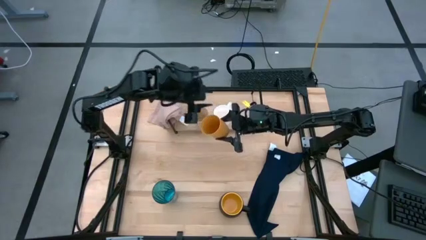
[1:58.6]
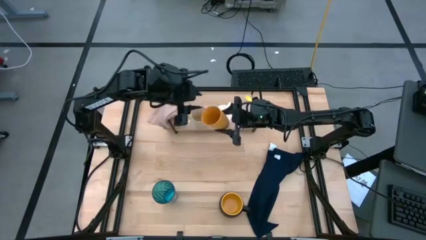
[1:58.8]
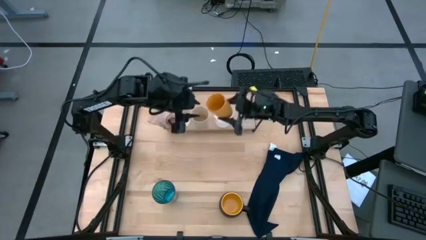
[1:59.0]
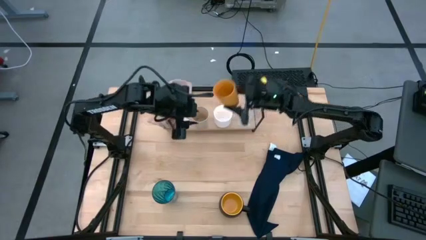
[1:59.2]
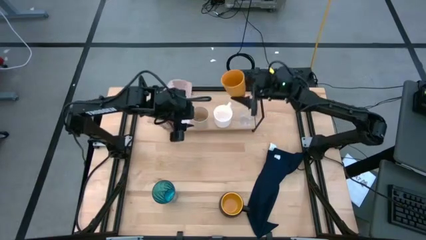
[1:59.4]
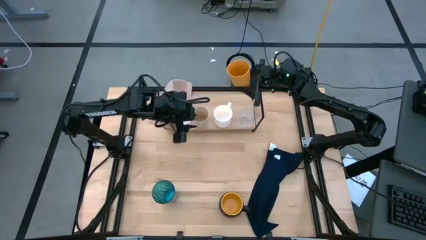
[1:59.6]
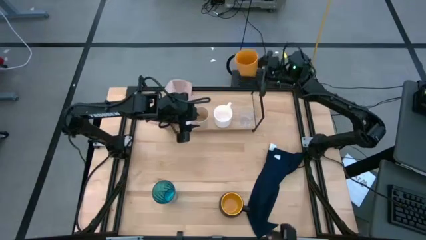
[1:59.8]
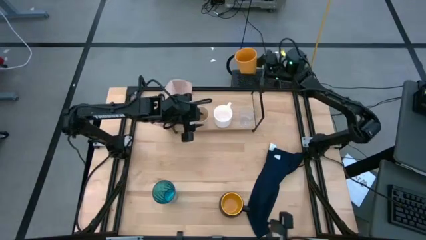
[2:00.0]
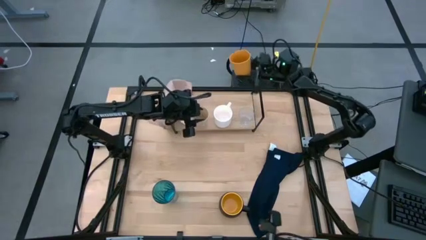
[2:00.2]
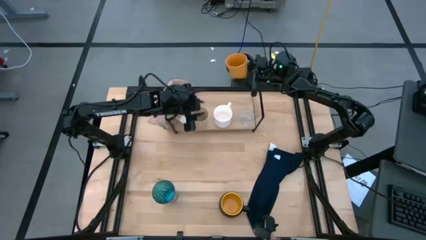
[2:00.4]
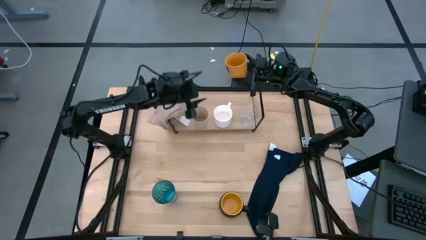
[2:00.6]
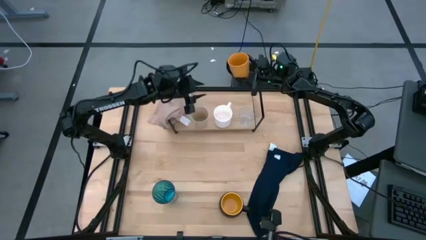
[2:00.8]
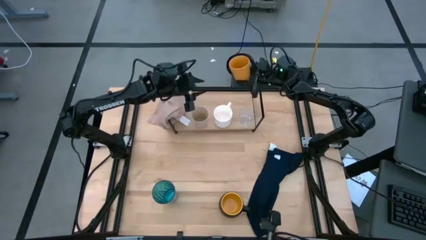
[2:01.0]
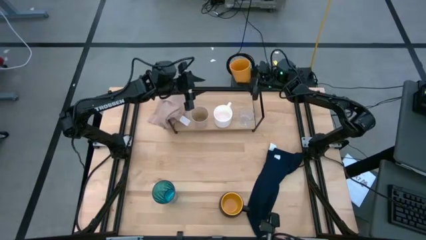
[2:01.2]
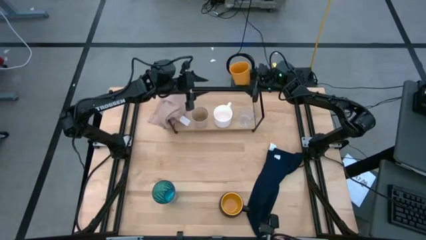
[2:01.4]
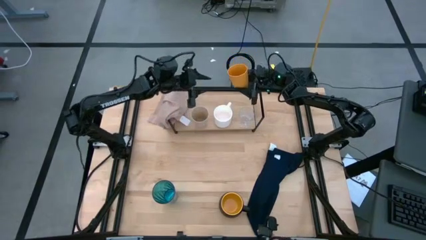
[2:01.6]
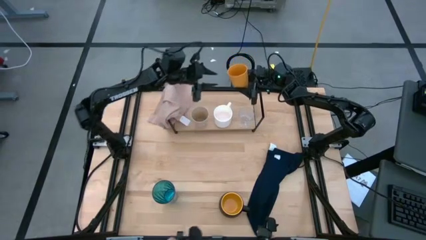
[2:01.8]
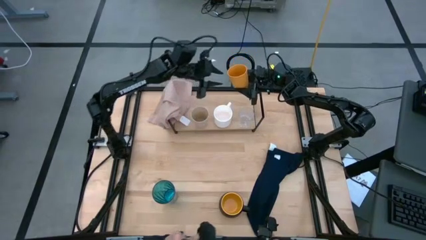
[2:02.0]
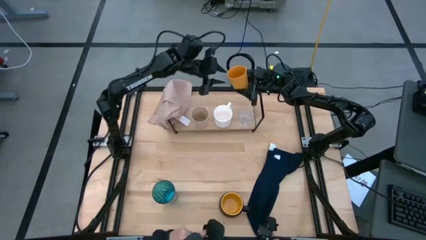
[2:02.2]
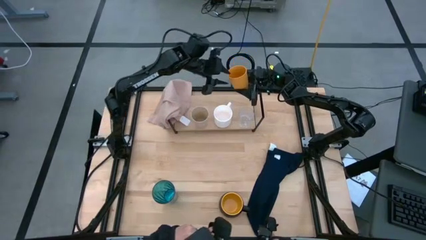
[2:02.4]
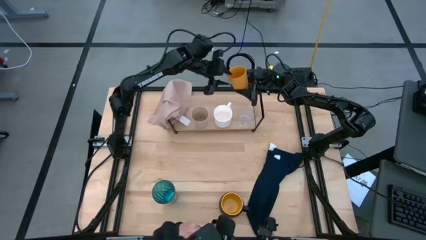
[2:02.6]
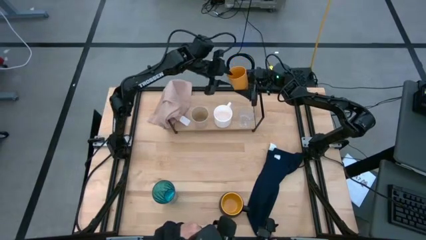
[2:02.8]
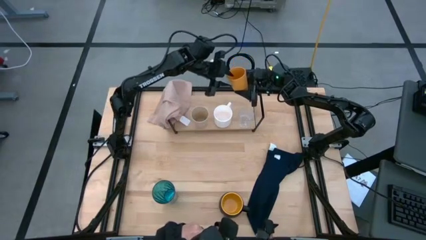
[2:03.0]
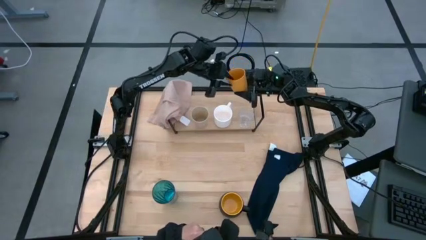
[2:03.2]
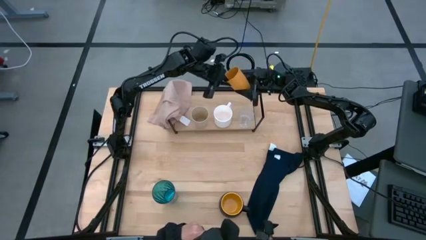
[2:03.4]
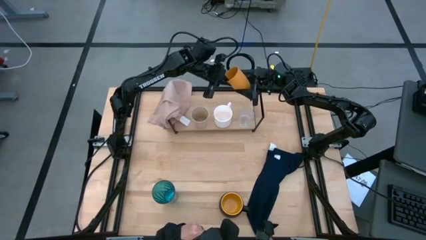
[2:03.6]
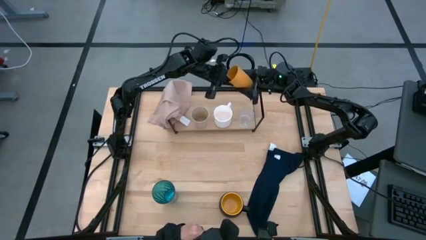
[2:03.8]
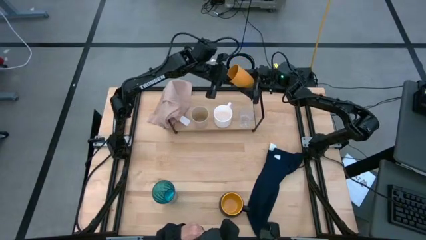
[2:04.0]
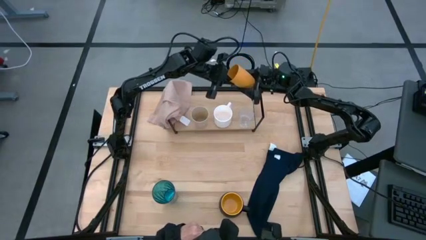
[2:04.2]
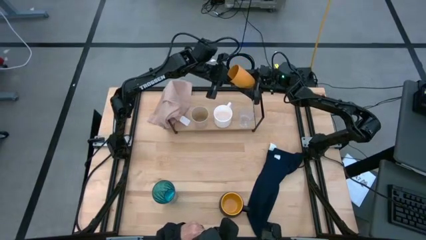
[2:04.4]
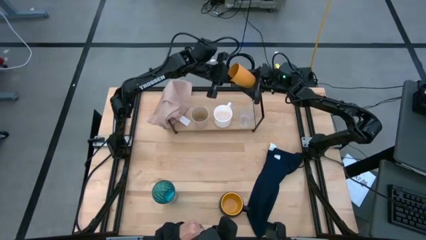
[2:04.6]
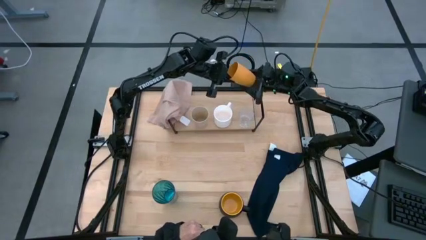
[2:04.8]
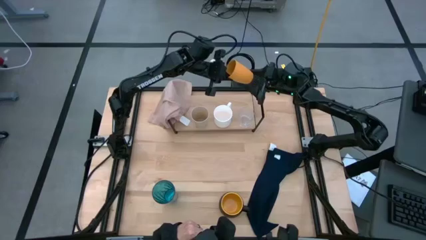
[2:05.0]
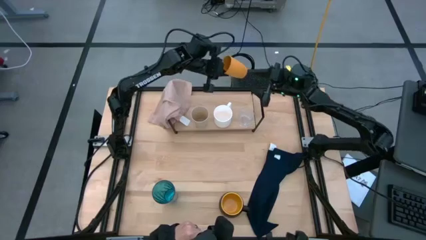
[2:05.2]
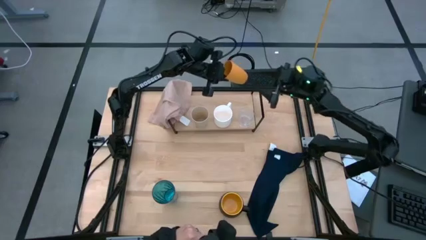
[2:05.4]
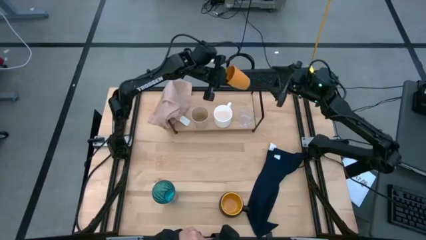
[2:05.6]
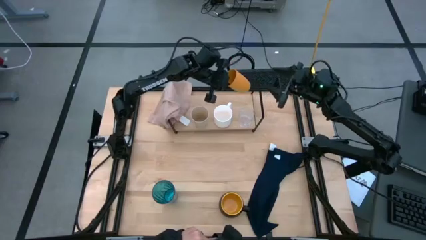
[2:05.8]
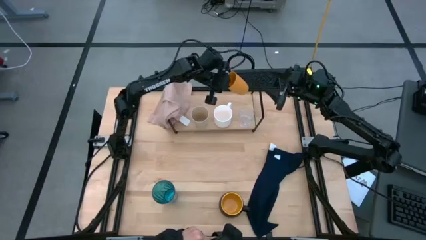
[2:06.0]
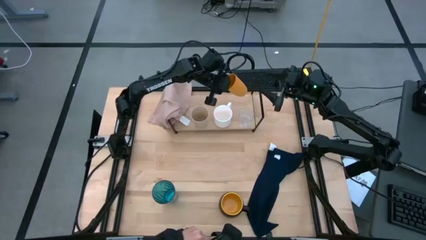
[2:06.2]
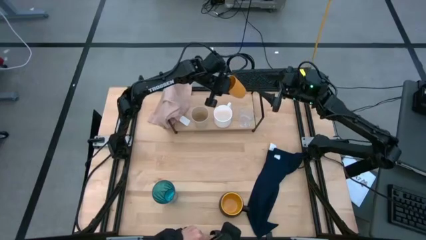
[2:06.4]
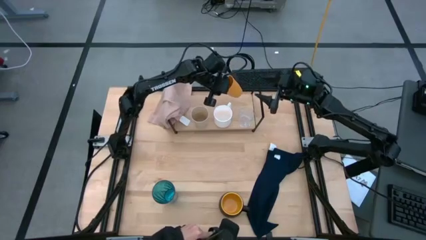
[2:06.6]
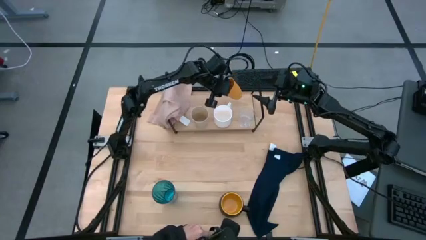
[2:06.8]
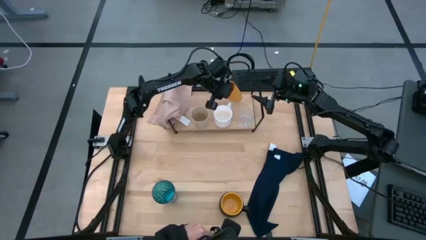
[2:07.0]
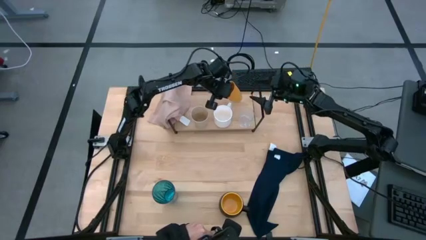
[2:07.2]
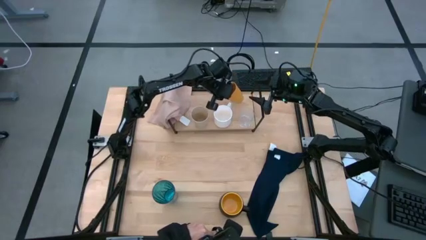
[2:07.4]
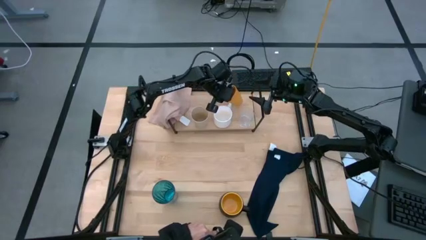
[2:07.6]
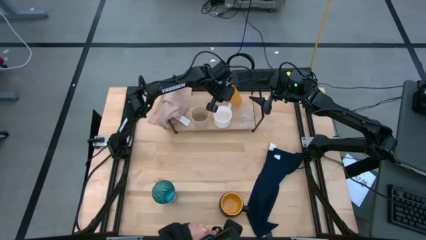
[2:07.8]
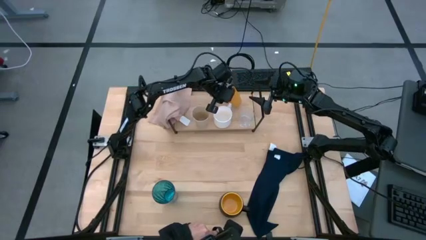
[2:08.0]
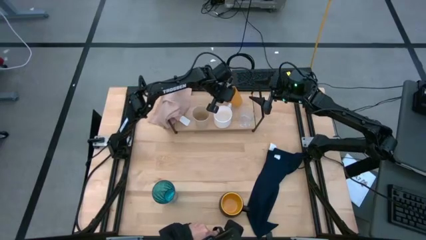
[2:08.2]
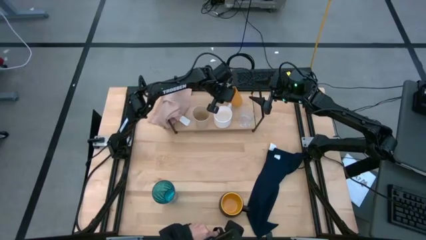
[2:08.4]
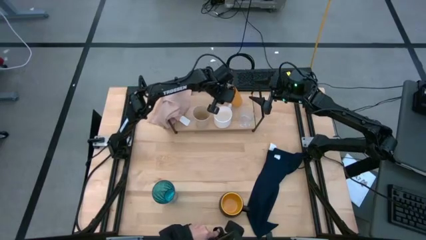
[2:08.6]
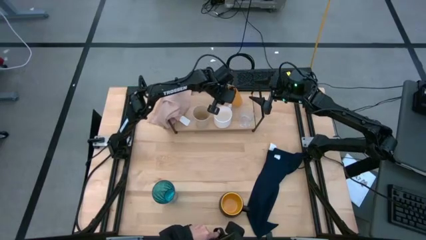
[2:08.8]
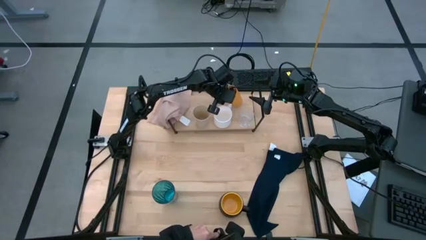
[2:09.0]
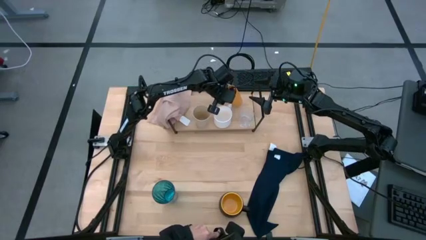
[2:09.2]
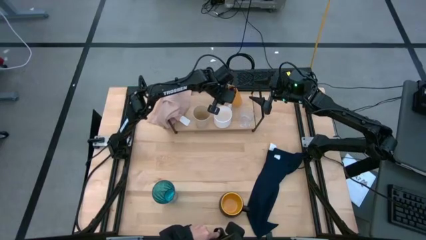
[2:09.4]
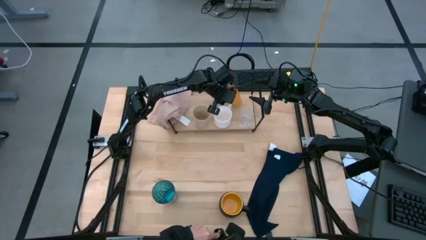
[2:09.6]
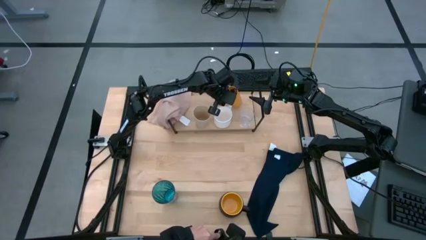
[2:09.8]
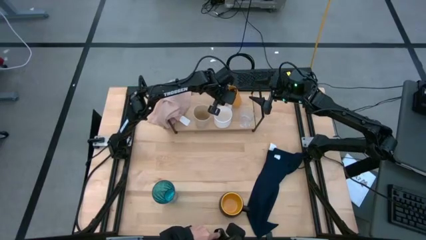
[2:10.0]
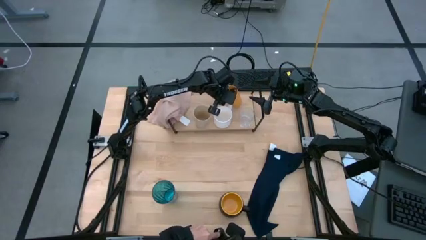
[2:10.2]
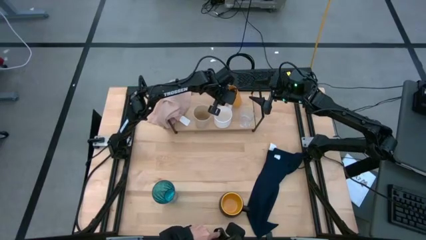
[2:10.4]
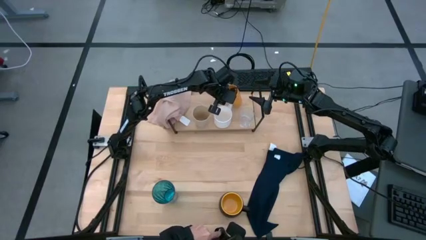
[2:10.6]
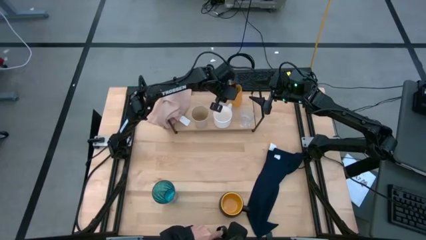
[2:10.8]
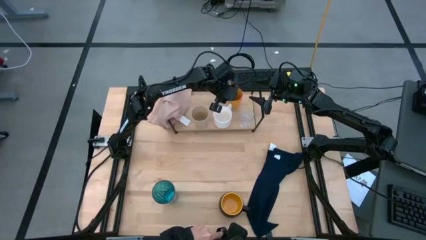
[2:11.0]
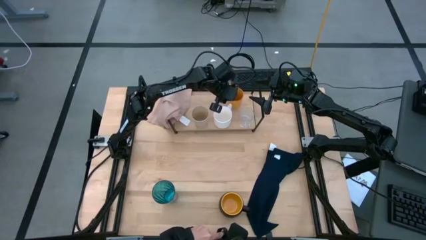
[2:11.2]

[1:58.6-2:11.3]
Task: Stack small to large cups/mugs on shelf
Put the orange cup on the shelf

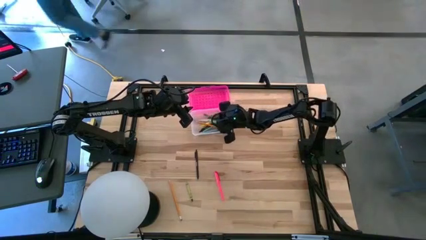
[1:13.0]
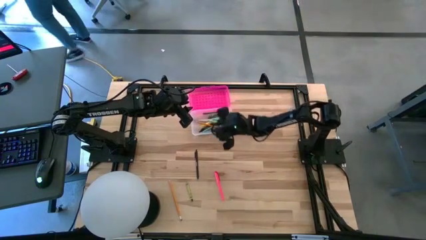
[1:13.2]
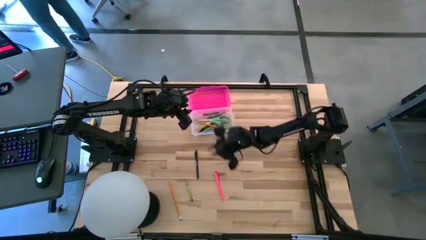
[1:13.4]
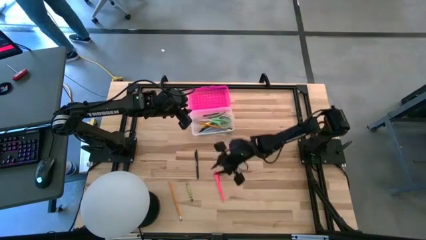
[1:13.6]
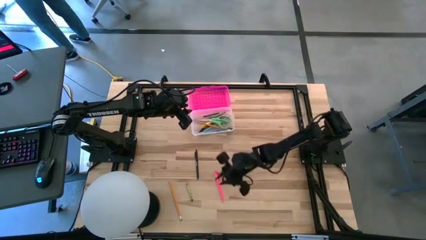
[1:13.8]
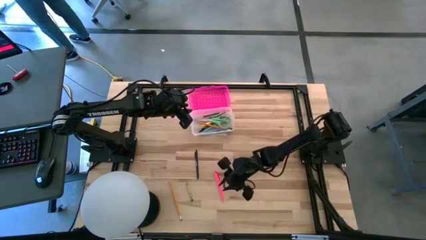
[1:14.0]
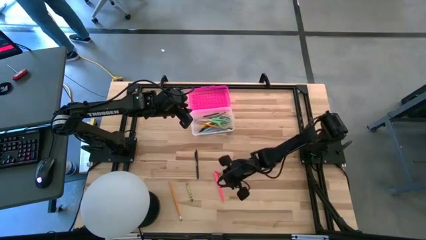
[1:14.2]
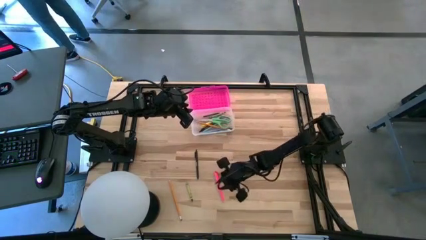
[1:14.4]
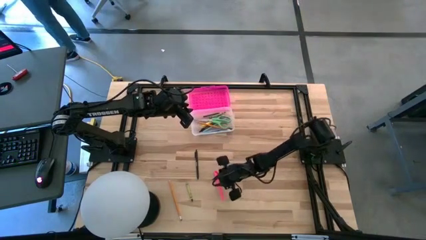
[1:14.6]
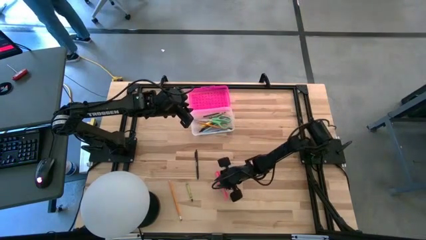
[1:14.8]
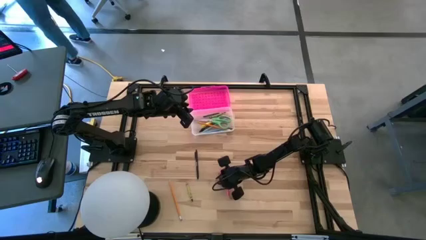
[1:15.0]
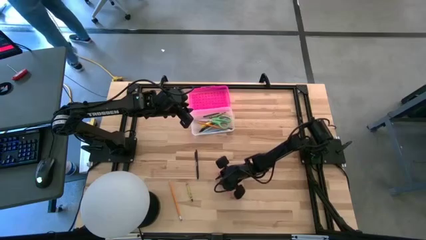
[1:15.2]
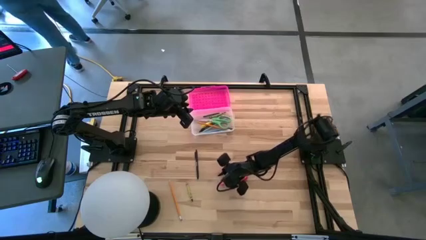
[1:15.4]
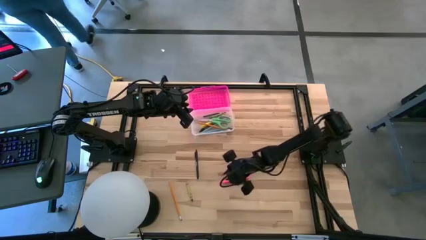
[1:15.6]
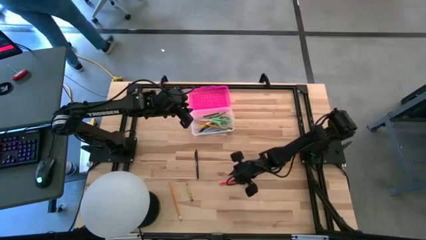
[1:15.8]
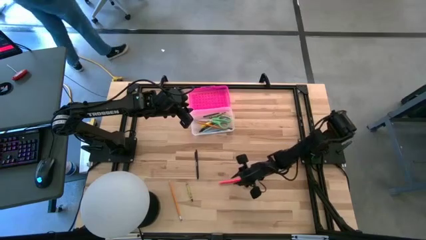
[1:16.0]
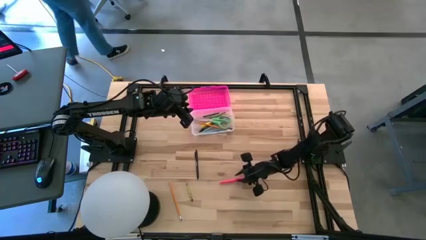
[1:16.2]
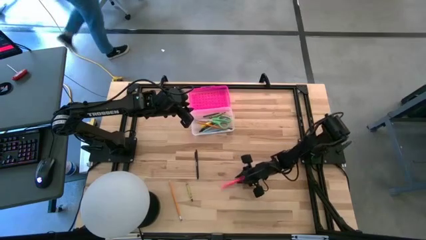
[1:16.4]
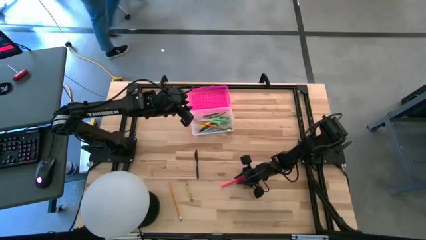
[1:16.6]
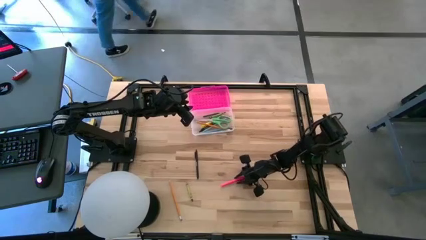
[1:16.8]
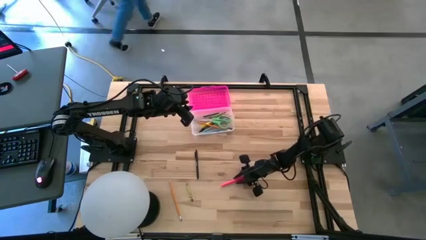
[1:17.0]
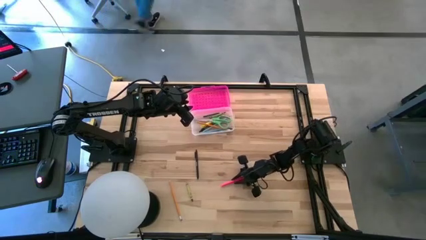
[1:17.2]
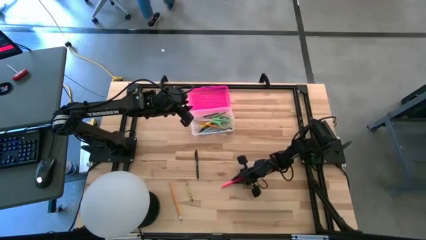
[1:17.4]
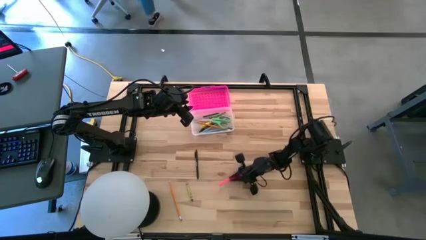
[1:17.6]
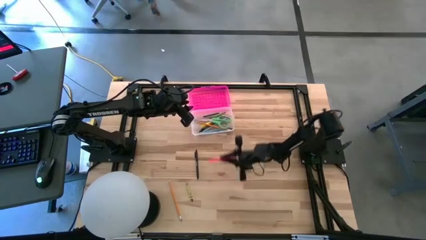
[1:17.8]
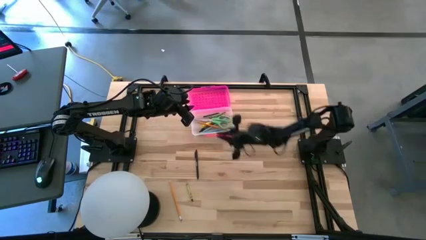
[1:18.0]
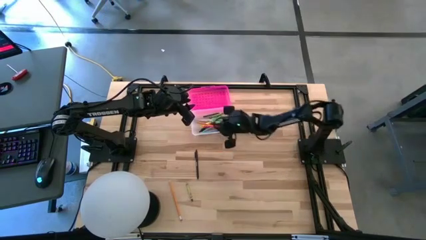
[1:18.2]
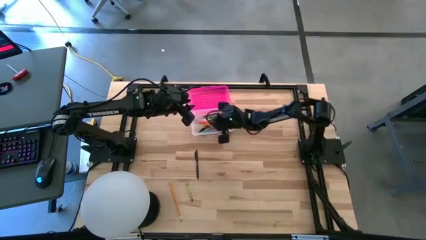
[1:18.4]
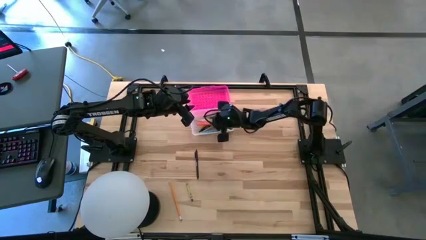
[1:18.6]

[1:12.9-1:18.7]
Task: Pick & place school supplies into a supply box
Put the pink pen into the pink supply box
